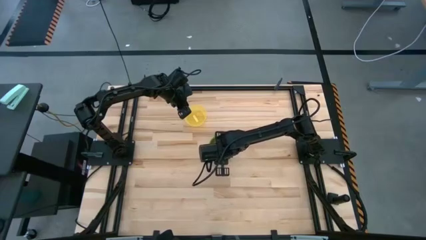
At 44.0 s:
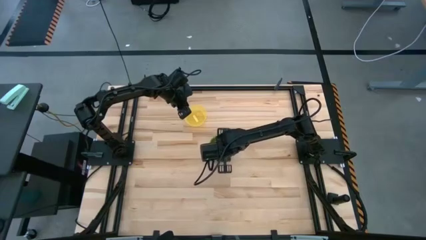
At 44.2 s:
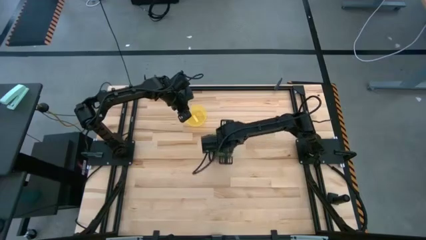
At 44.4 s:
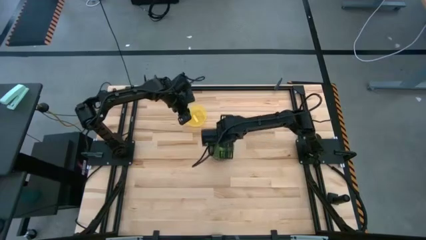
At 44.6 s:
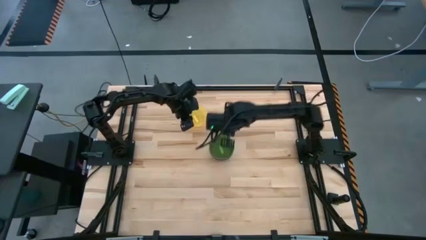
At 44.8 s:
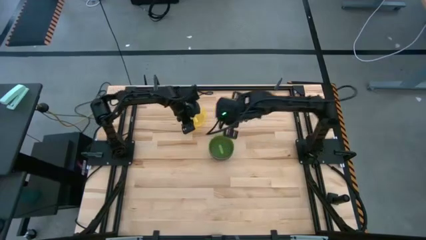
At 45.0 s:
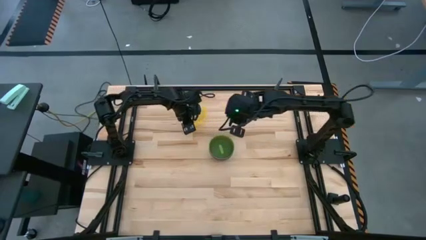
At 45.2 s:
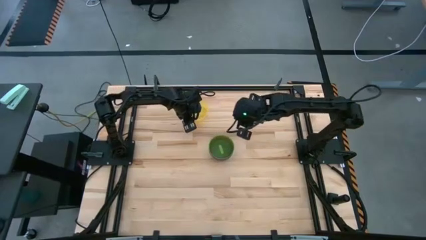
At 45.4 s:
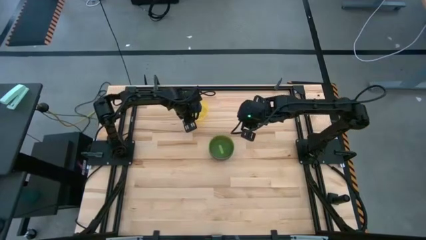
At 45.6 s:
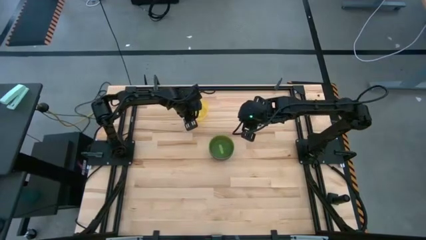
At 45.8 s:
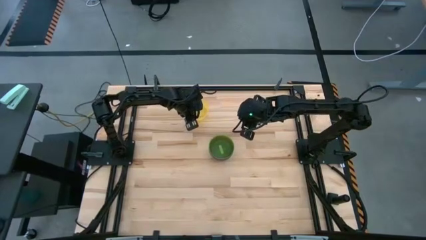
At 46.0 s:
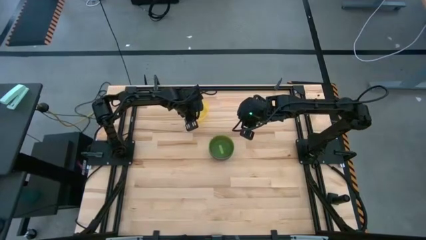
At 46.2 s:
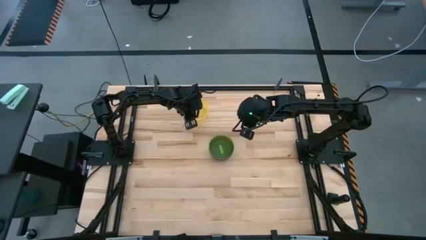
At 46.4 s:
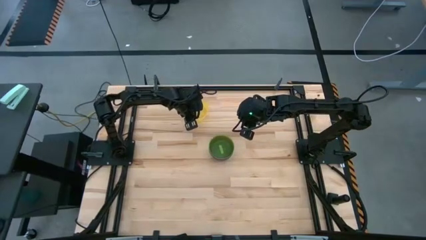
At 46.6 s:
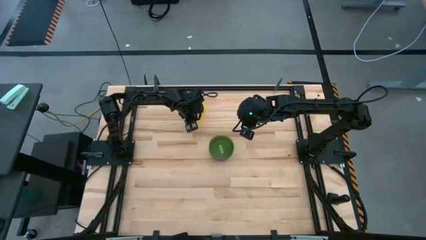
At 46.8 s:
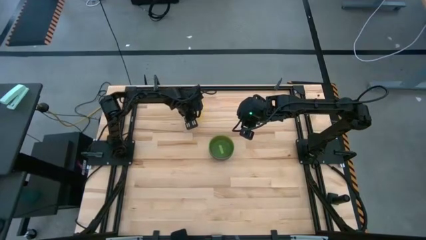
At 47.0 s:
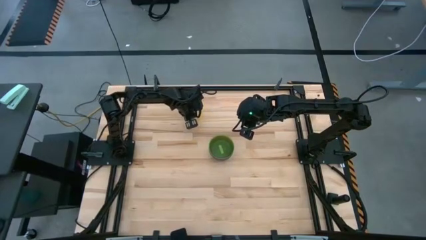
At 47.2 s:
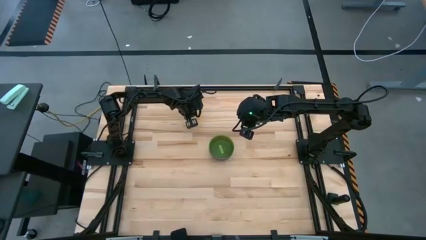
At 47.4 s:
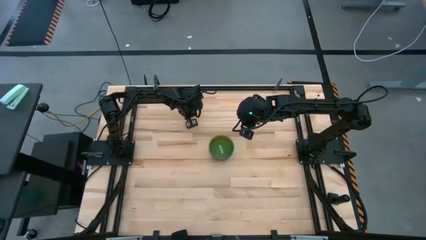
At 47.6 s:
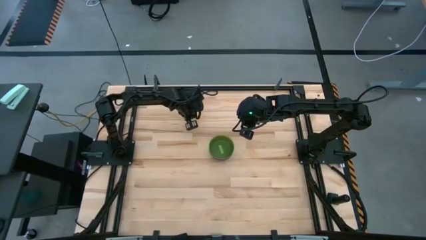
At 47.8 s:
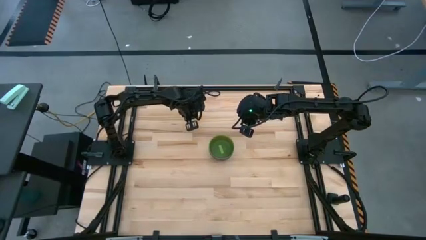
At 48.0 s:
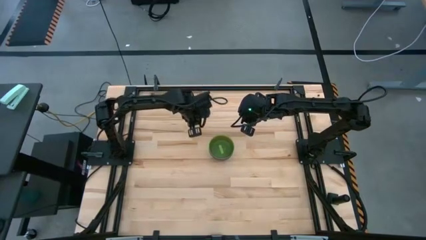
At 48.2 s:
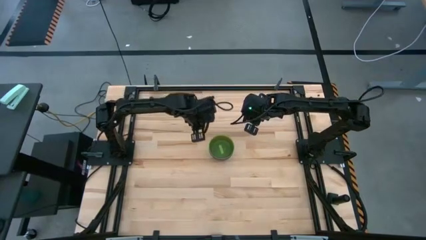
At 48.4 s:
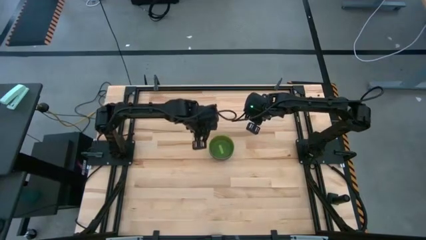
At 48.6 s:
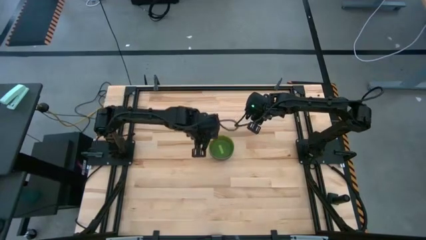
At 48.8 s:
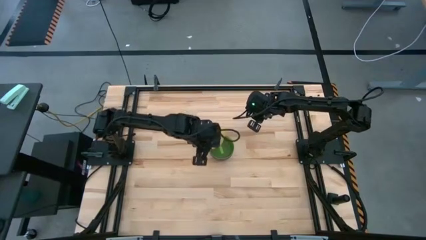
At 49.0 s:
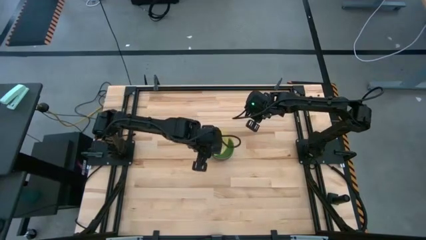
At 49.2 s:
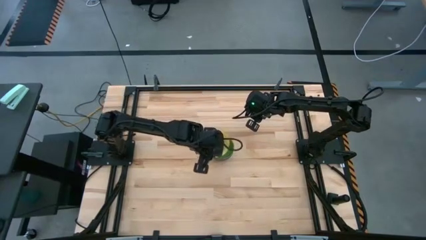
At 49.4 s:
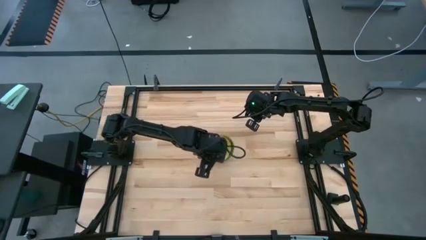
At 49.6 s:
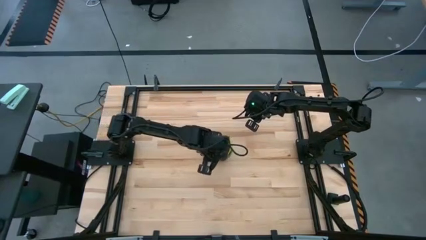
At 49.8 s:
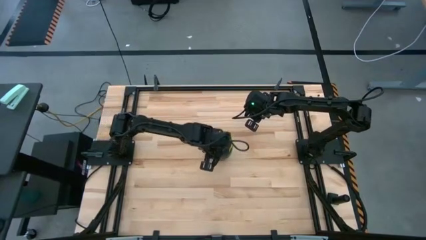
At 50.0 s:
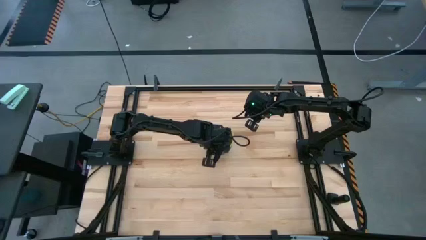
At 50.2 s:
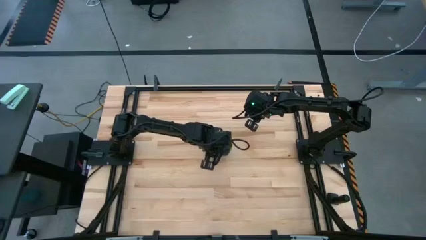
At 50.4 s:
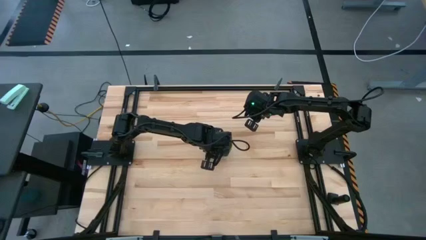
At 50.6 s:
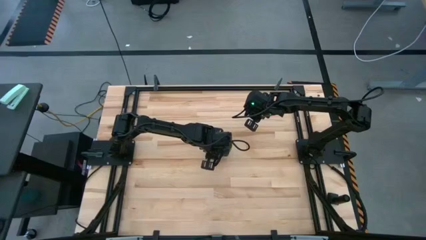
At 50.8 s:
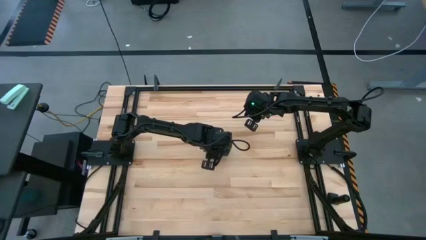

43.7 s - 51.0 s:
Task: Nest bowls inside each other
Stack the yellow bowl on top of the green bowl

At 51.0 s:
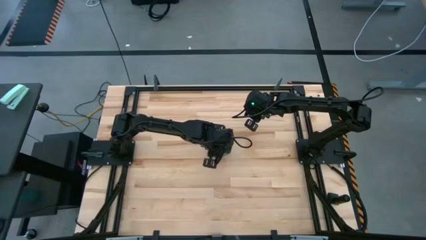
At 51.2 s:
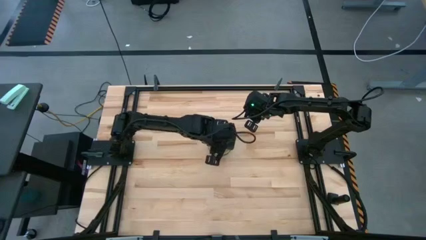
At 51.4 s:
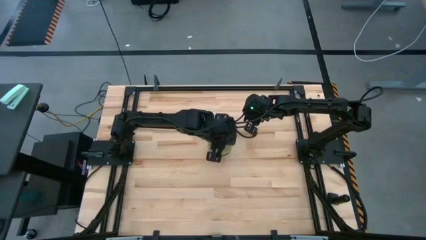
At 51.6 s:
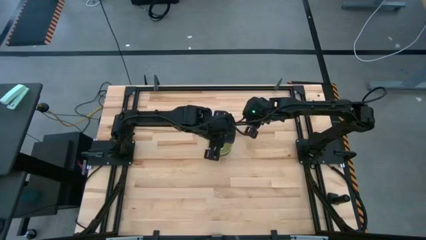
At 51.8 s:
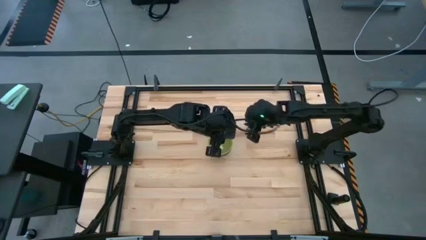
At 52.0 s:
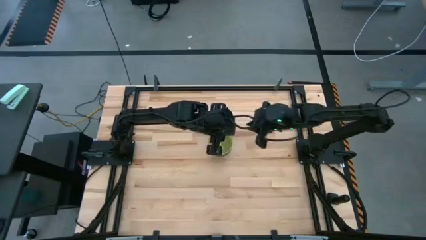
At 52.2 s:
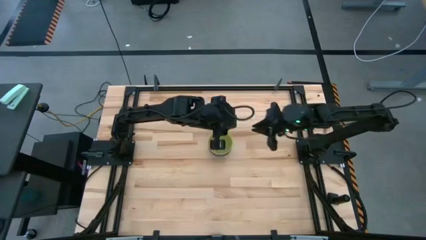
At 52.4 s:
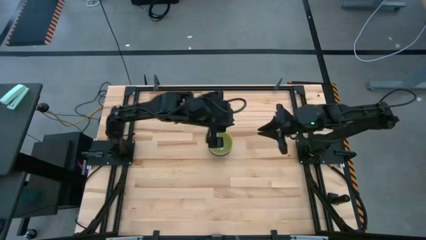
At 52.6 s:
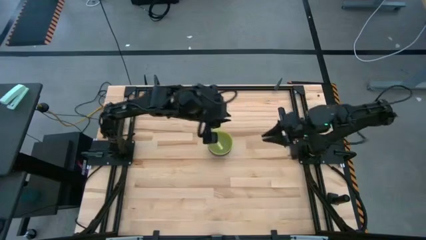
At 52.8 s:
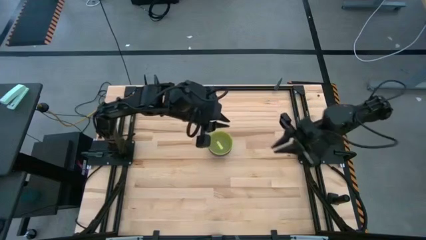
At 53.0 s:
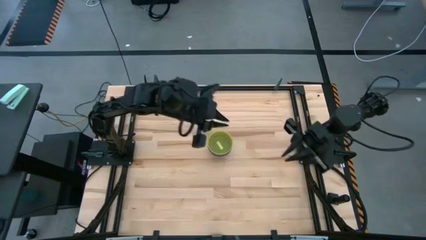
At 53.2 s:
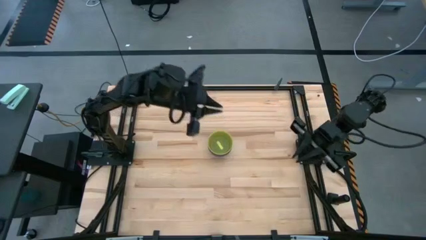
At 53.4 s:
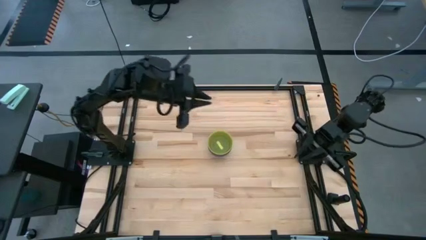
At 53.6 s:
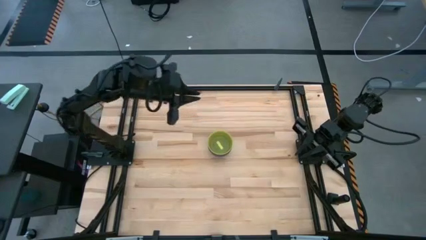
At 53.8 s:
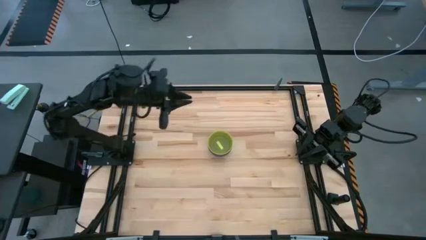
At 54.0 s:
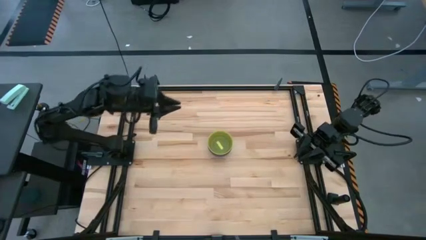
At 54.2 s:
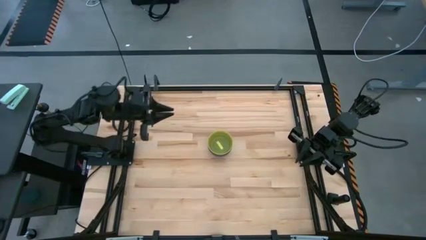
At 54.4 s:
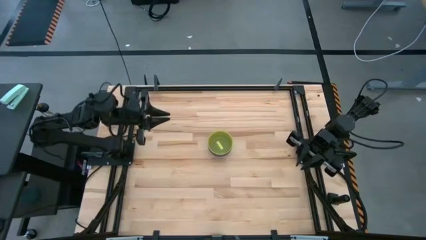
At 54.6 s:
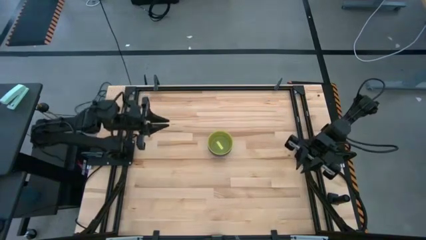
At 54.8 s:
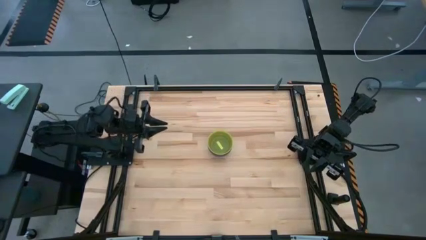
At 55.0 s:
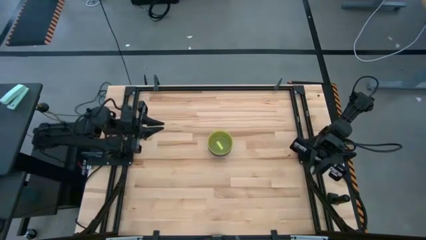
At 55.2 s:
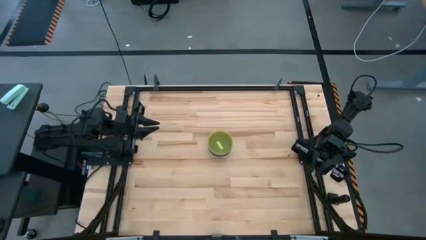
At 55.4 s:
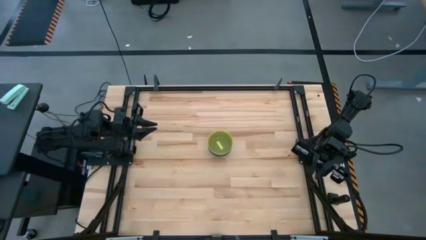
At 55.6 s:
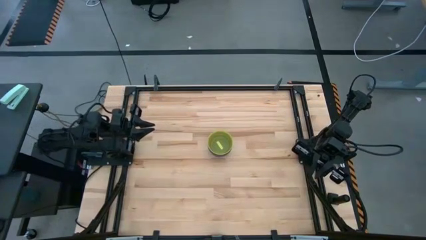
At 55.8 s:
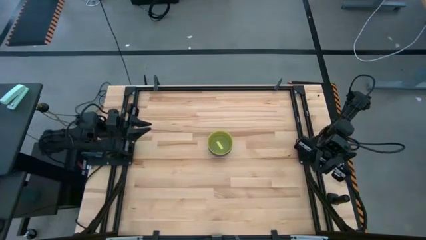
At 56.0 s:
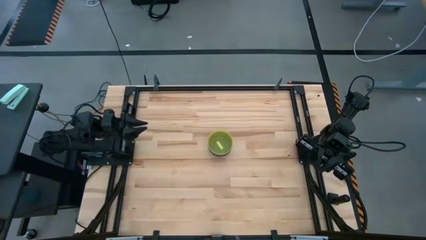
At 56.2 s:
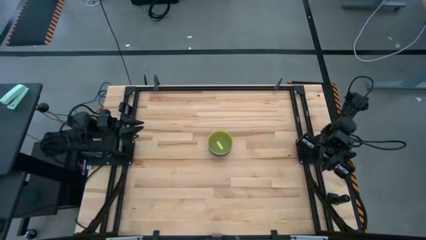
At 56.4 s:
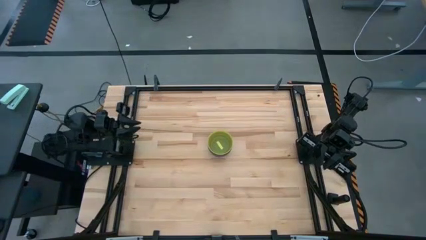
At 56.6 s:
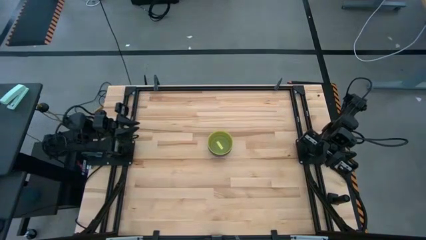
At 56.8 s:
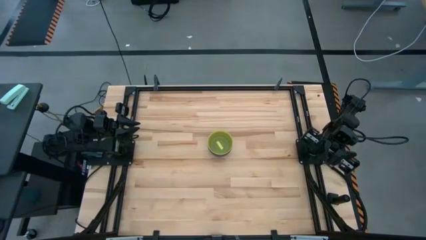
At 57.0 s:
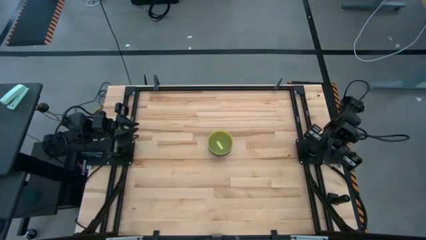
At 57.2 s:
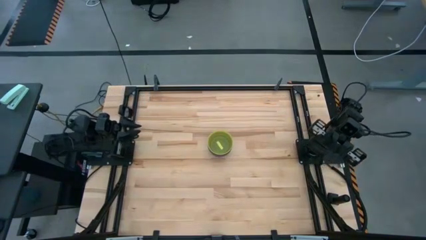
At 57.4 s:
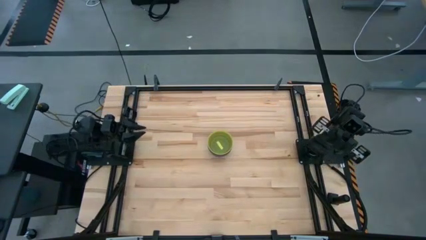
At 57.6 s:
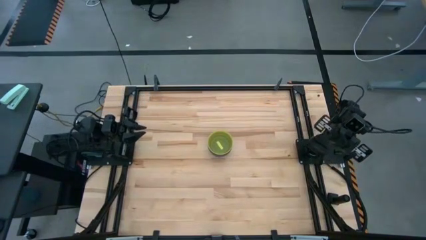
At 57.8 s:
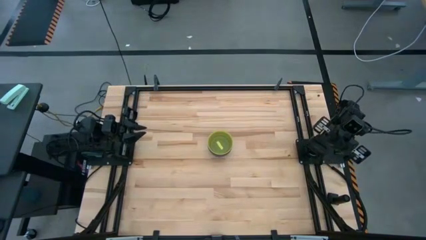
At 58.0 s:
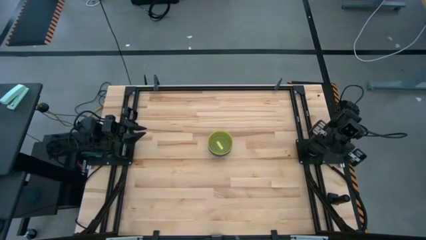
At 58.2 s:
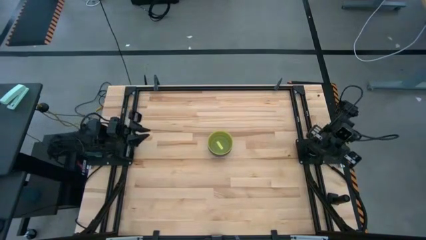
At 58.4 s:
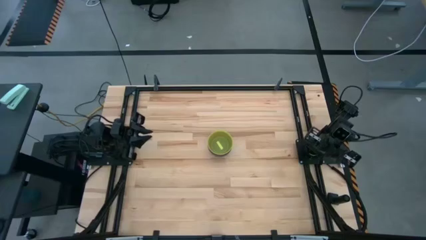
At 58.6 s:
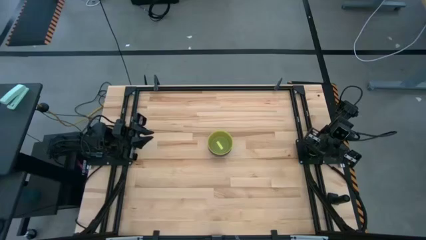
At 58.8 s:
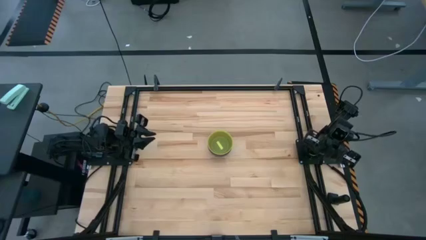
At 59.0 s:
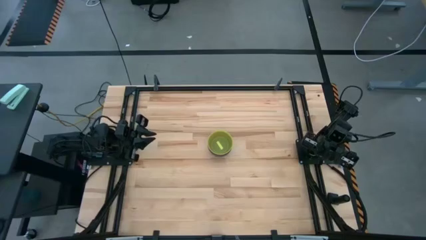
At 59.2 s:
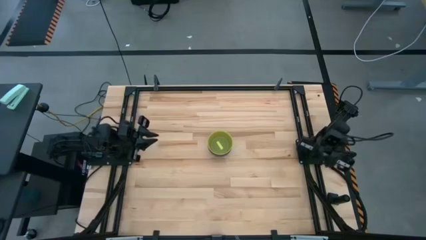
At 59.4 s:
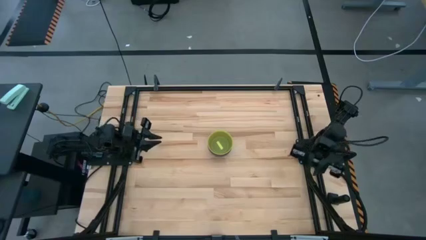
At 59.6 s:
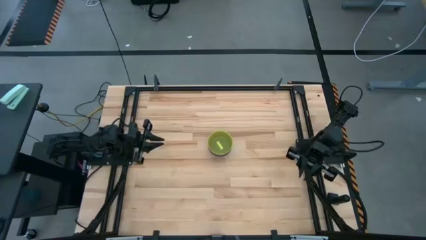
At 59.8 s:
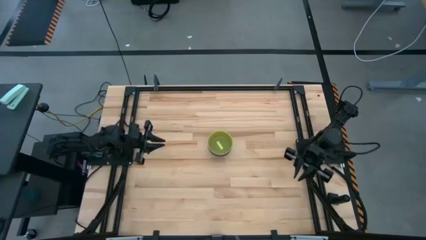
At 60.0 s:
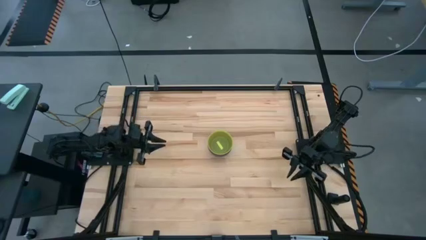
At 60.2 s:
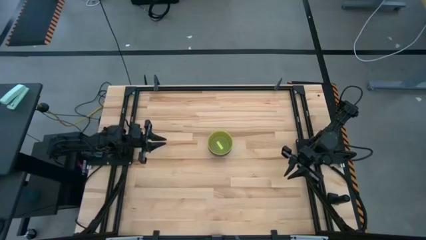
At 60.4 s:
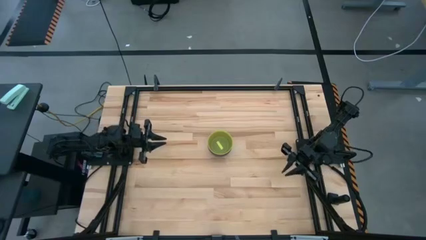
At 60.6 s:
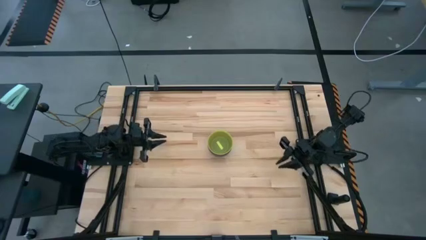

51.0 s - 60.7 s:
Return to Home Position
